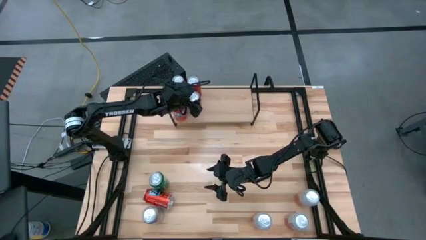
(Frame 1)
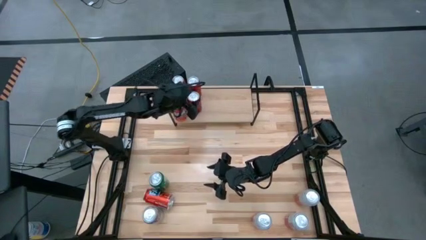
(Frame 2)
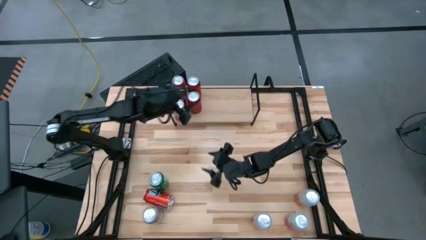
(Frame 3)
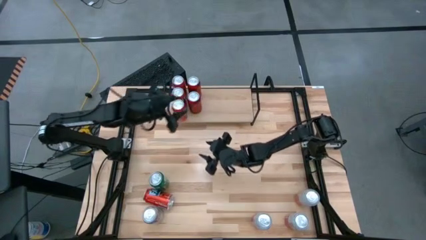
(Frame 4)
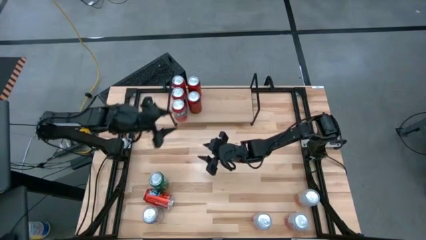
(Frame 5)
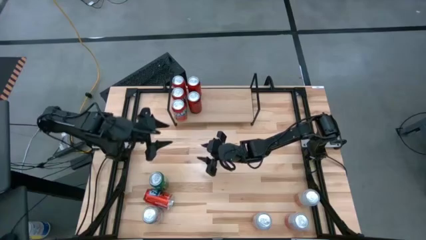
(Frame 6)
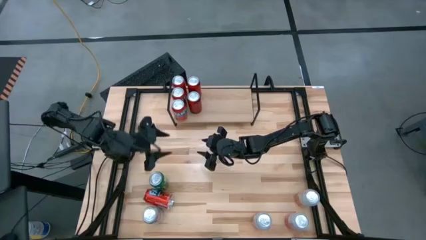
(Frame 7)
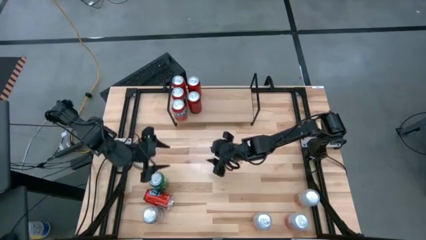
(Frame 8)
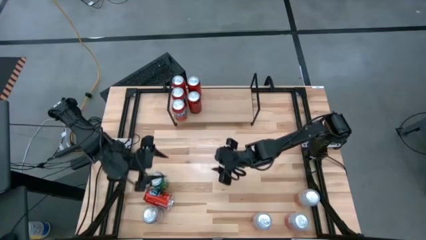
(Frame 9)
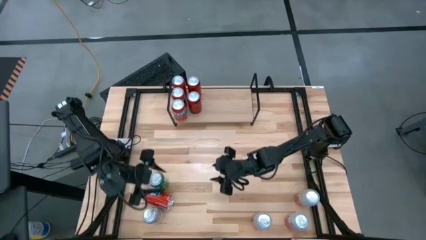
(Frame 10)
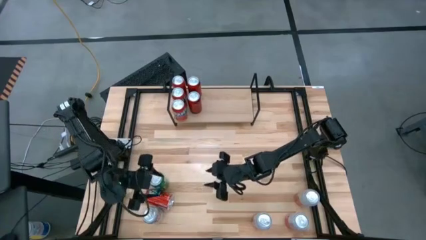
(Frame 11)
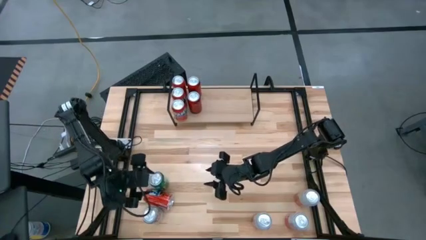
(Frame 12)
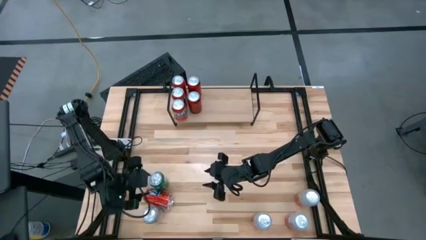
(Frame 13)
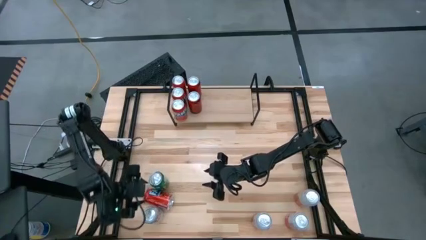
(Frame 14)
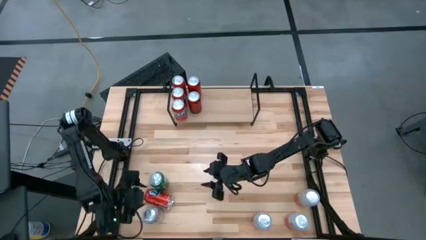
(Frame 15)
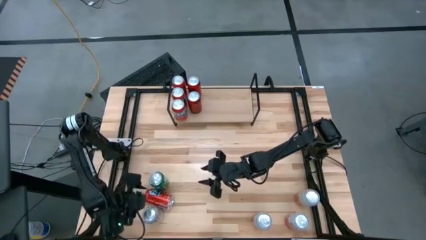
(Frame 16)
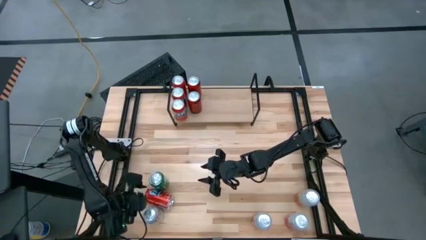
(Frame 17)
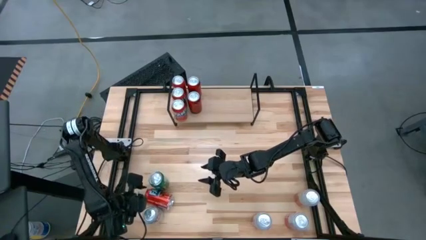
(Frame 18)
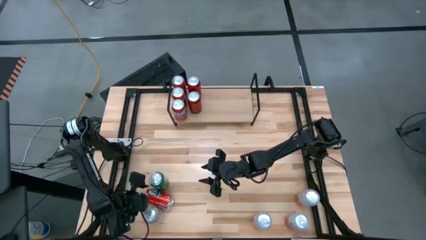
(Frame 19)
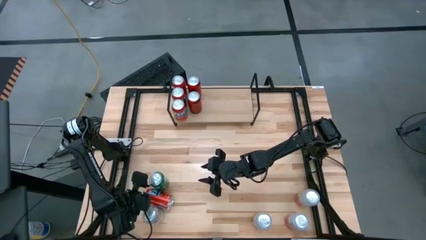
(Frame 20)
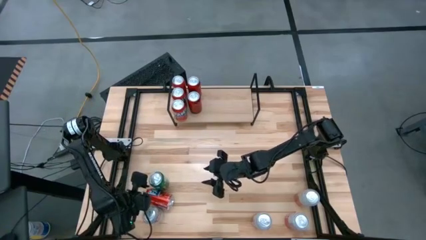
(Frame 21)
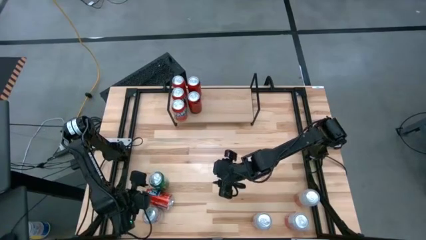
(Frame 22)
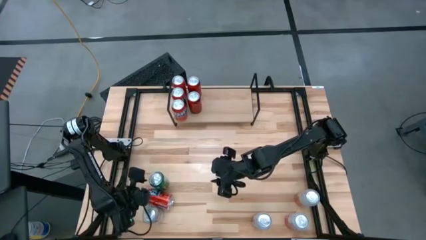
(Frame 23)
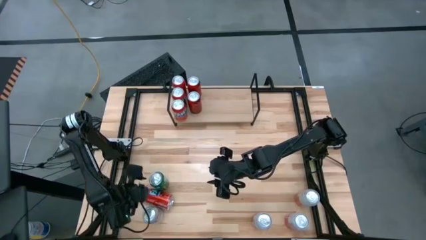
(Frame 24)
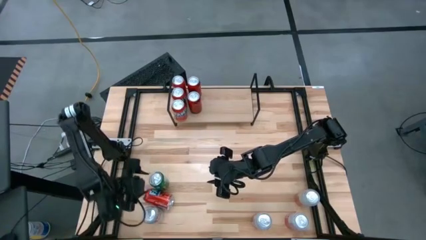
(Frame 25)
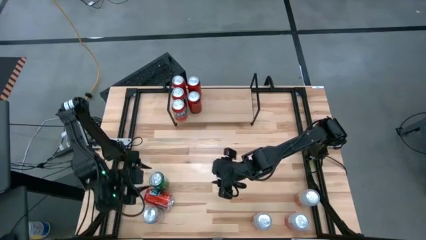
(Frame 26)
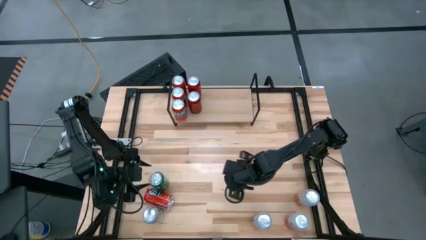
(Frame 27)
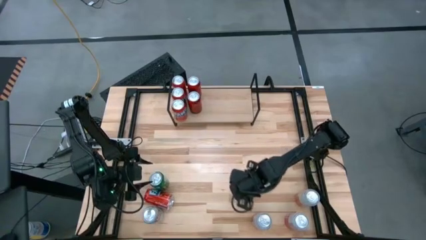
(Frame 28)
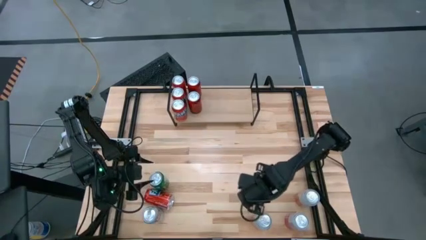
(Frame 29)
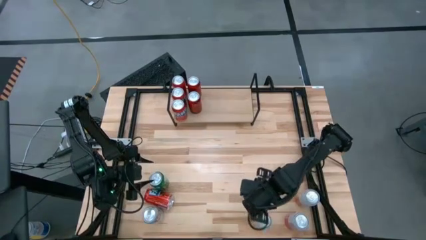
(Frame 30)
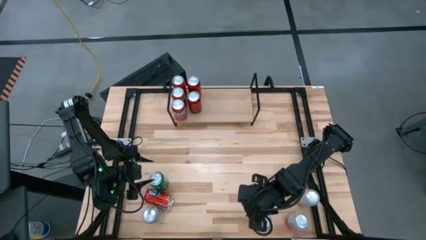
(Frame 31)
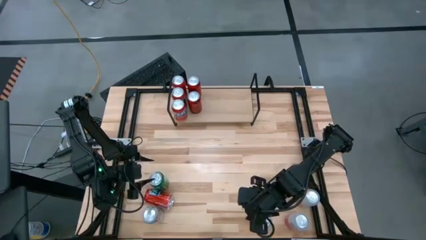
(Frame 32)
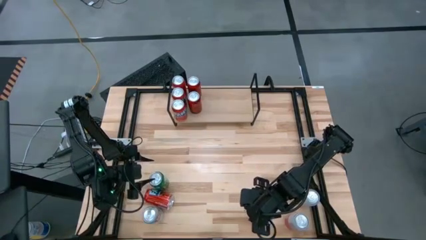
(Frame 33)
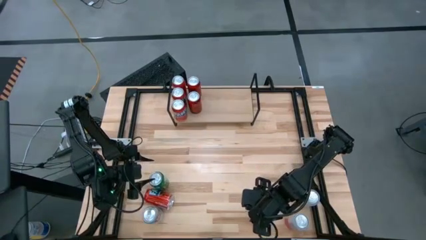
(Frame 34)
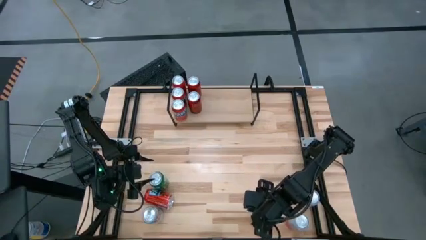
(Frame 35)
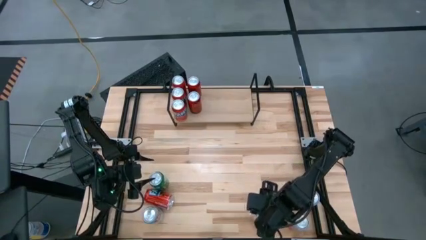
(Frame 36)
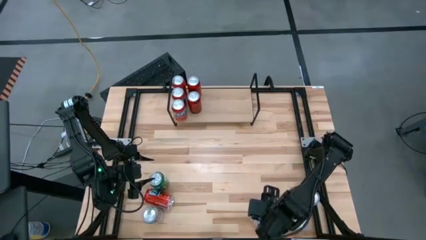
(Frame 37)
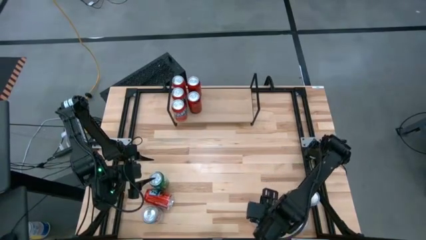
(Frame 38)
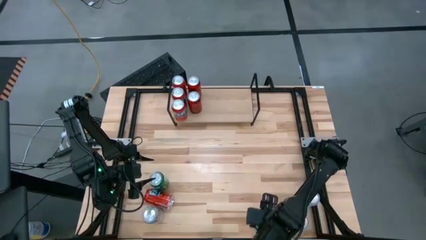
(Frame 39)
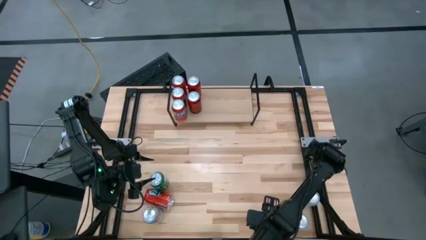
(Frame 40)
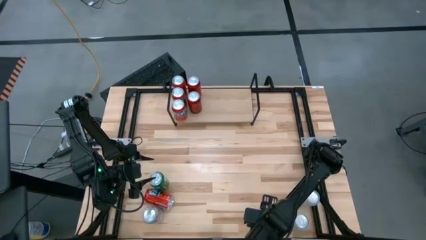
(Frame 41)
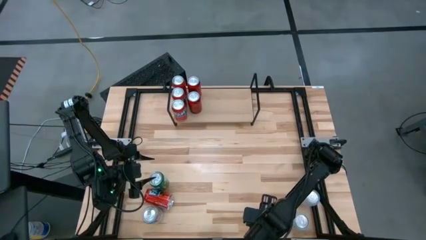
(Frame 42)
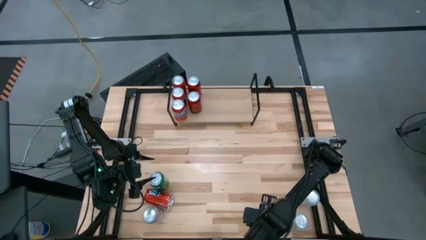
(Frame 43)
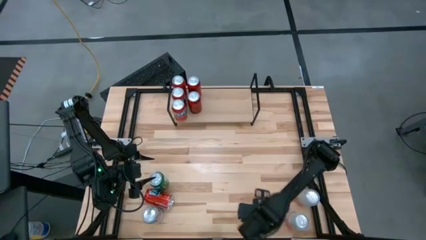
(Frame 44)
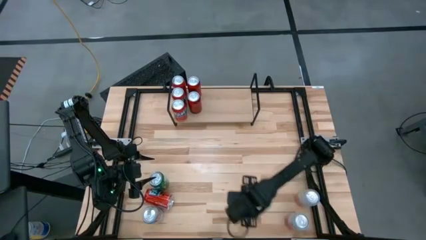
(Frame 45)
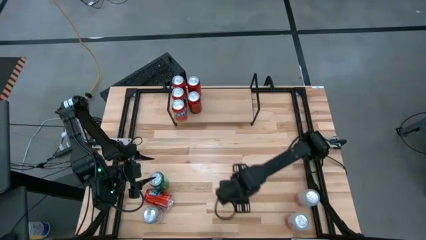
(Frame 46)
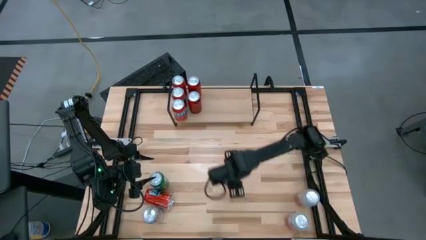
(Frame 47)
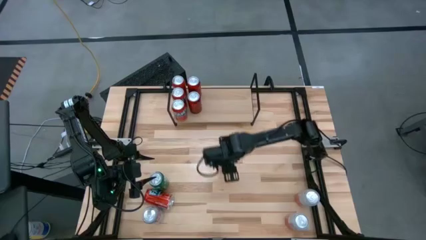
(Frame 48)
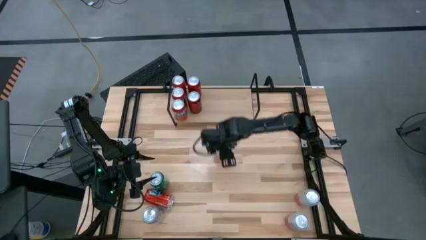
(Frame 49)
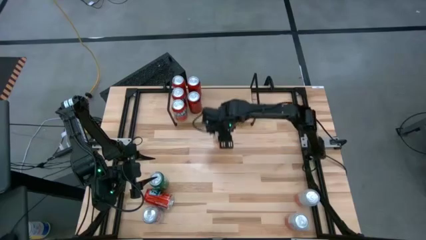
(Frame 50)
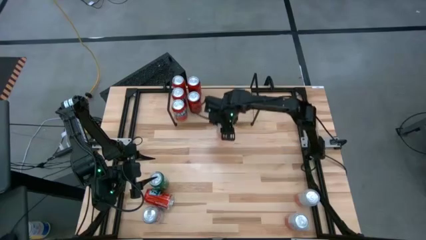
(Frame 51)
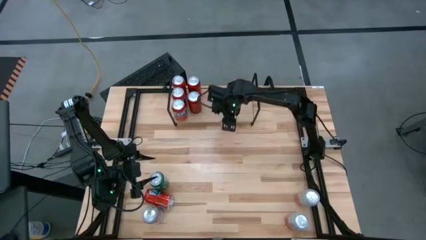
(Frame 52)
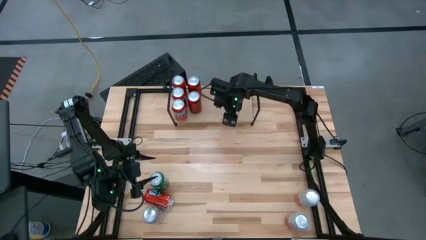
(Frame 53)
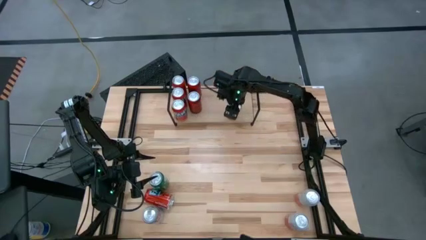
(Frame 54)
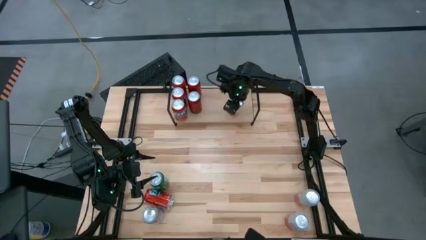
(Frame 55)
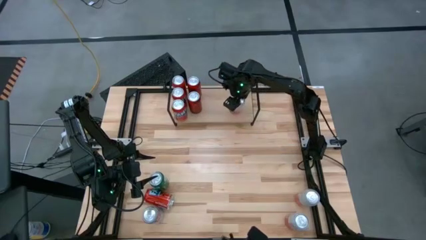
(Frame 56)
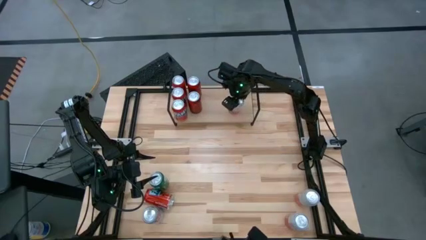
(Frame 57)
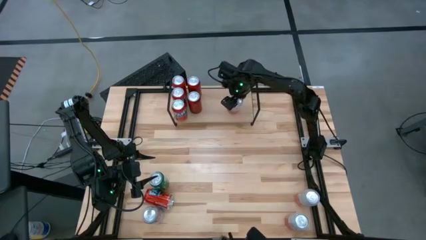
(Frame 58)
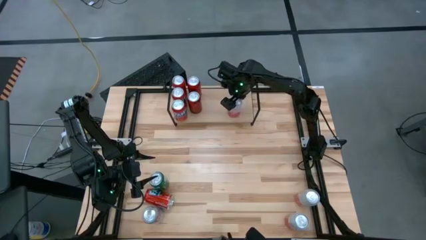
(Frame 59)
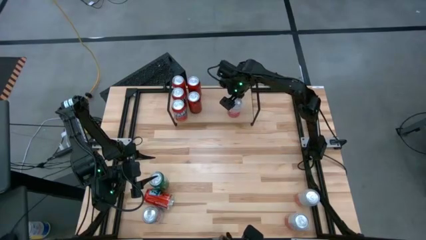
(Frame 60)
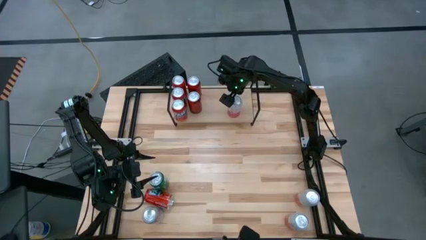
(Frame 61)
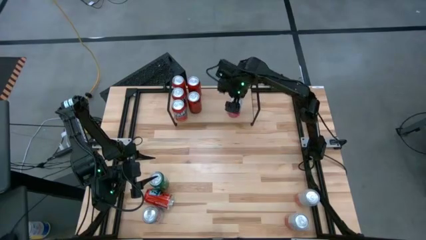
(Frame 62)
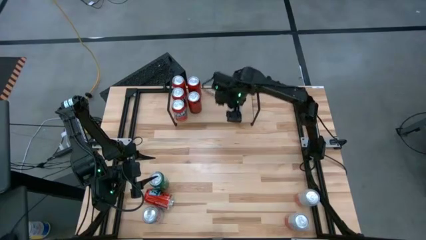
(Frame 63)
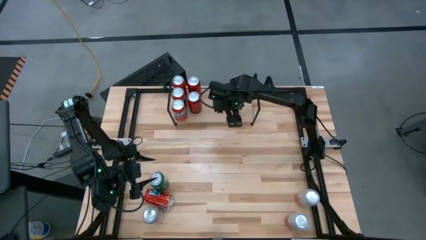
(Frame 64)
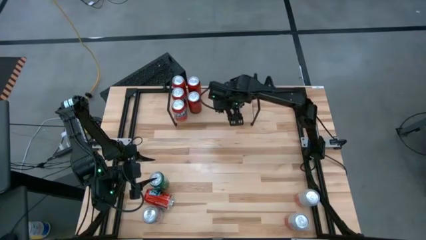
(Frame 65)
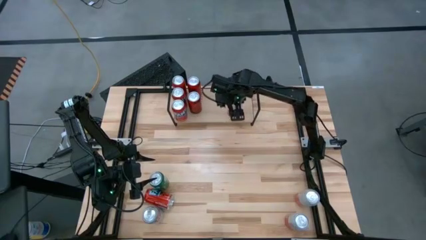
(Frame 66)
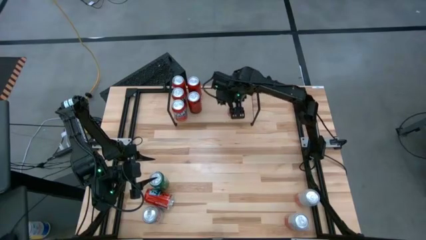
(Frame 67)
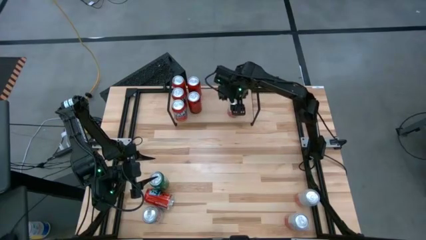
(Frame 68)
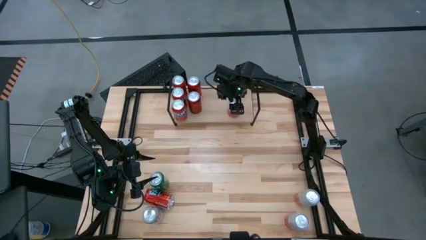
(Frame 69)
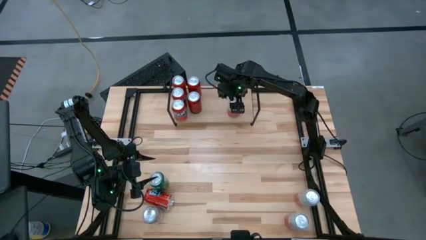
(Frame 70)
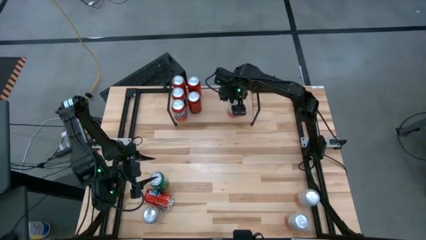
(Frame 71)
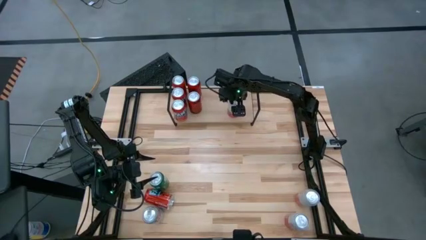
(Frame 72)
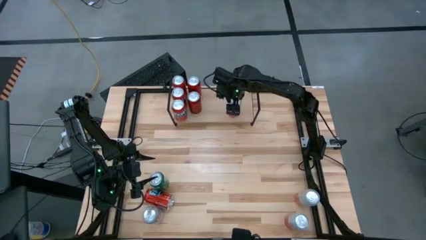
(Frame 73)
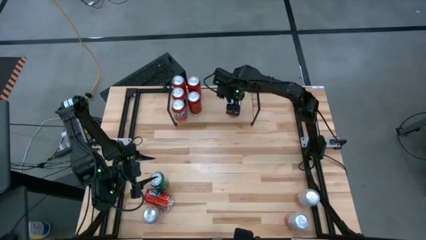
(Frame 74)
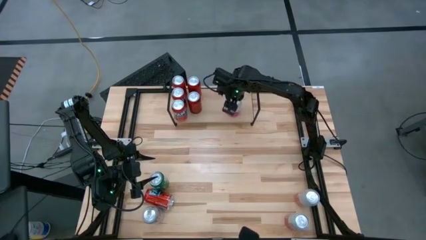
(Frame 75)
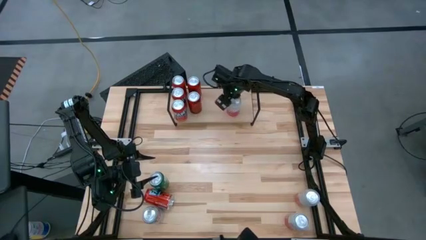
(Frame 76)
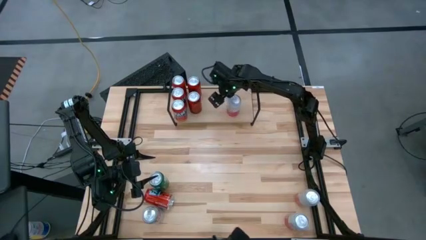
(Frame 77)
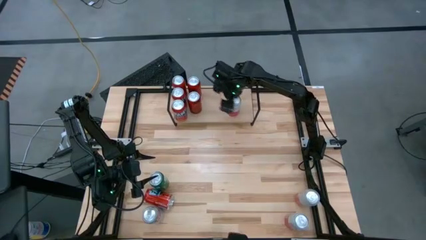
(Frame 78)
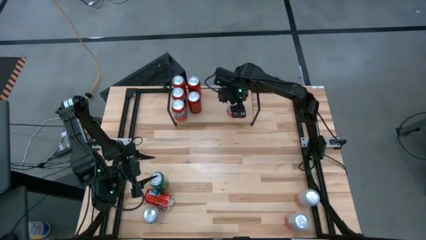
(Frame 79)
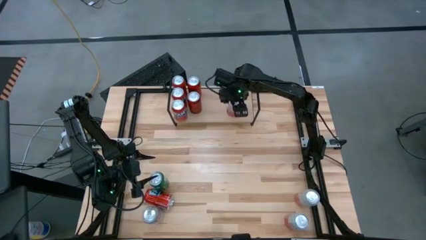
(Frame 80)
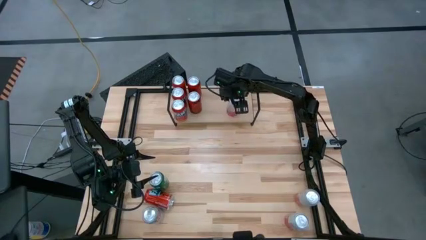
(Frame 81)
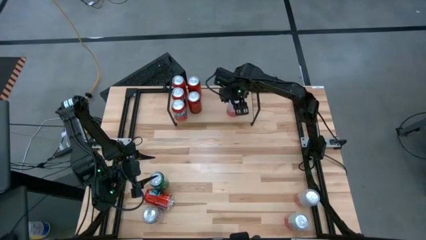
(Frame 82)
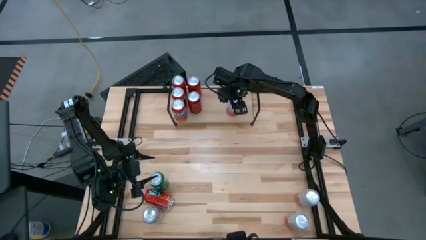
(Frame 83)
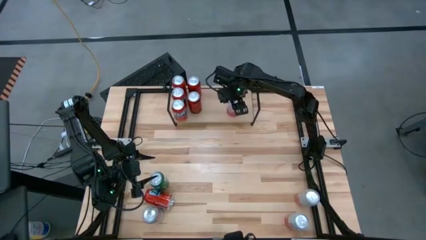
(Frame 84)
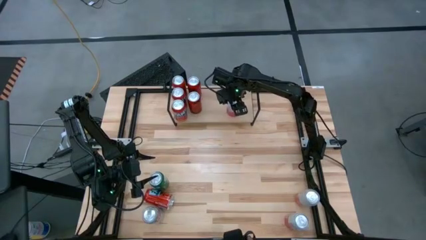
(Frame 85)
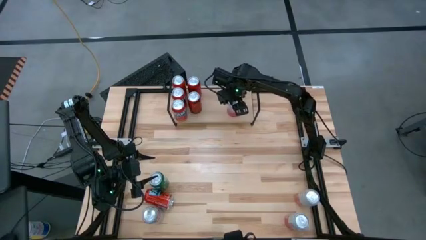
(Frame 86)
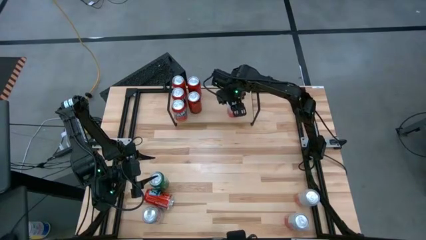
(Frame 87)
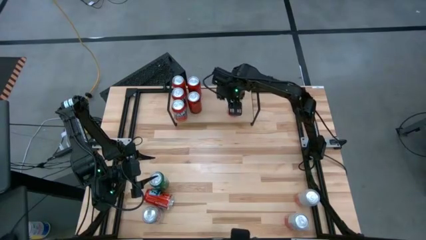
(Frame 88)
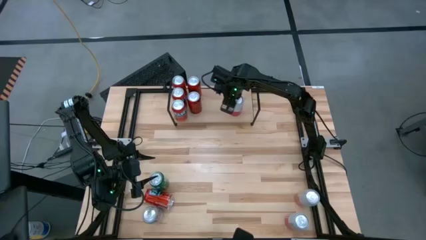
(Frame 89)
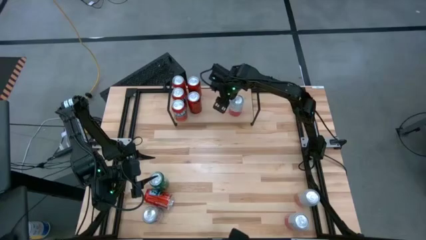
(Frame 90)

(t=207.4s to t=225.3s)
Task: Place canned beverage on shelf
Put the pink white soda can on the shelf
